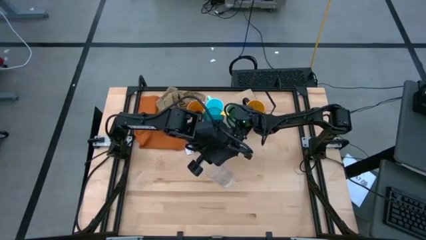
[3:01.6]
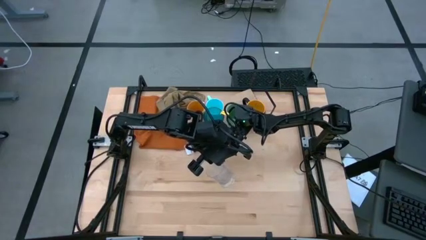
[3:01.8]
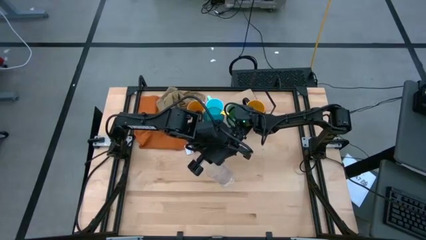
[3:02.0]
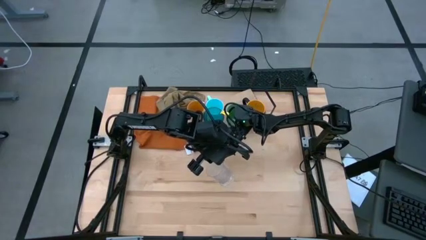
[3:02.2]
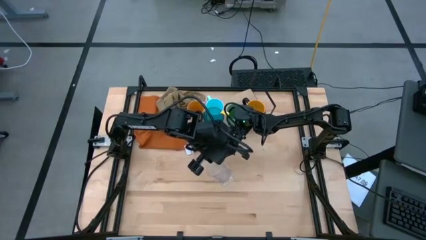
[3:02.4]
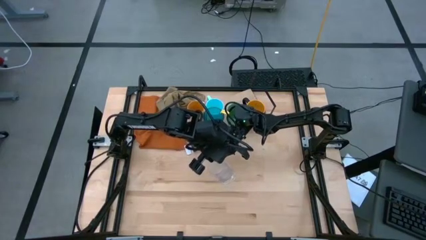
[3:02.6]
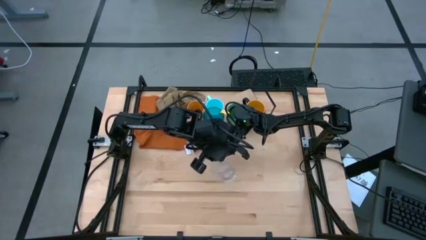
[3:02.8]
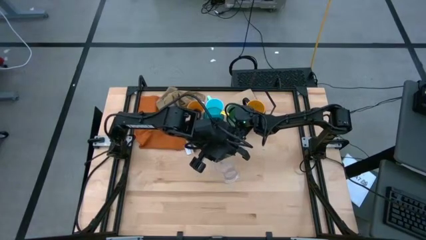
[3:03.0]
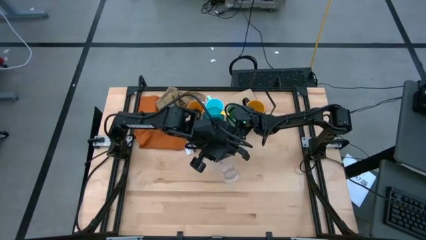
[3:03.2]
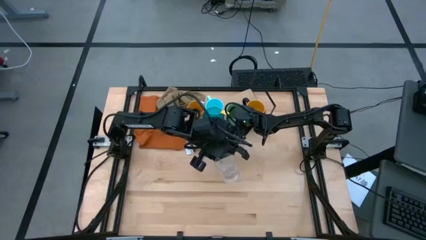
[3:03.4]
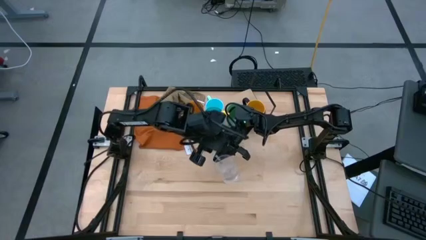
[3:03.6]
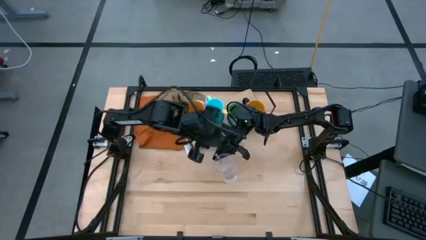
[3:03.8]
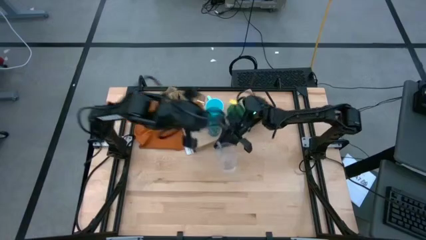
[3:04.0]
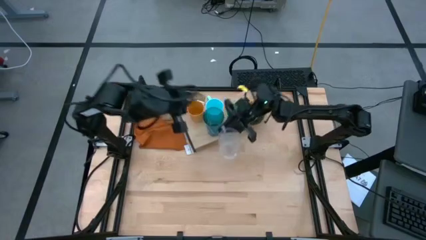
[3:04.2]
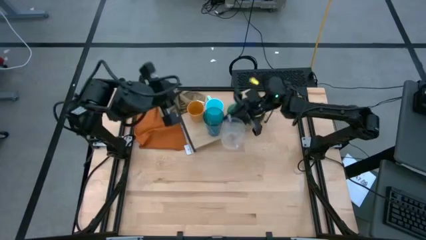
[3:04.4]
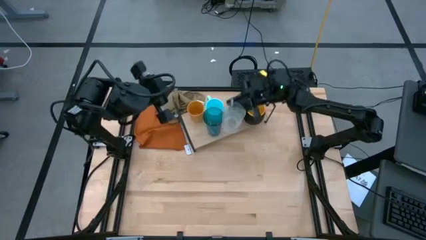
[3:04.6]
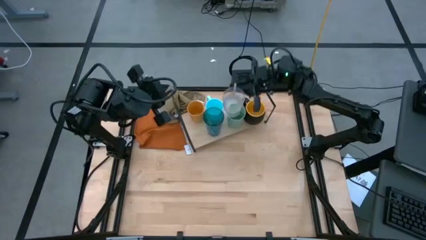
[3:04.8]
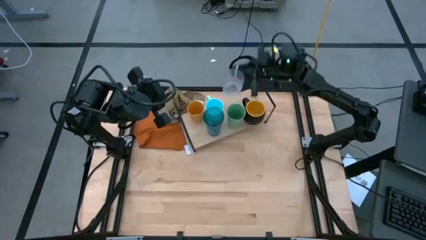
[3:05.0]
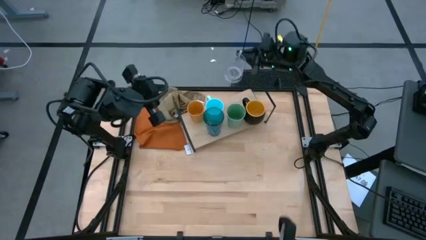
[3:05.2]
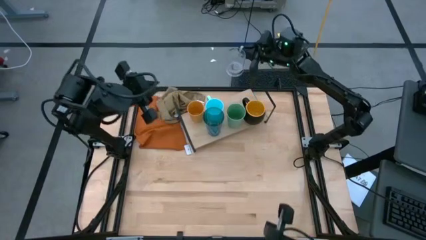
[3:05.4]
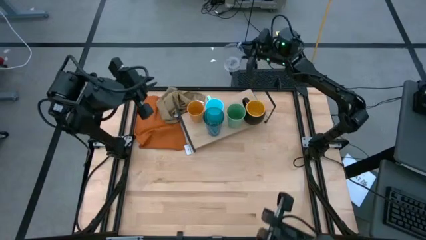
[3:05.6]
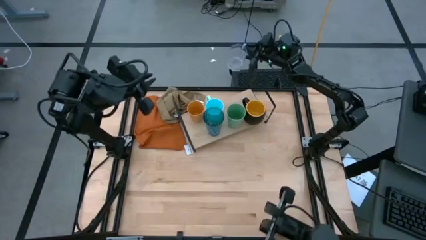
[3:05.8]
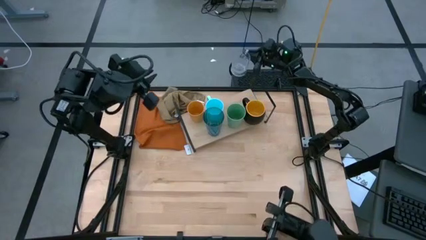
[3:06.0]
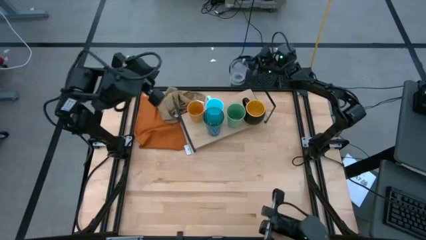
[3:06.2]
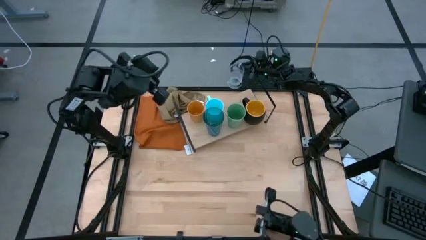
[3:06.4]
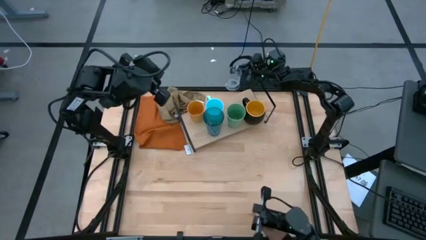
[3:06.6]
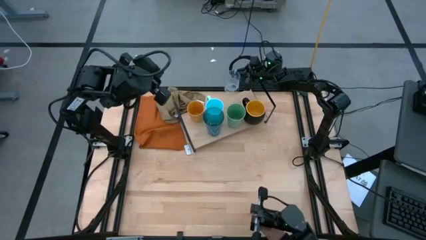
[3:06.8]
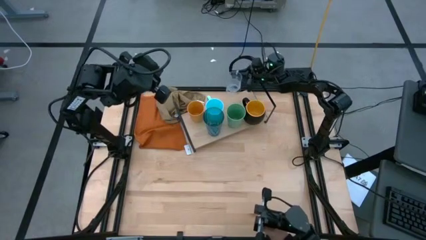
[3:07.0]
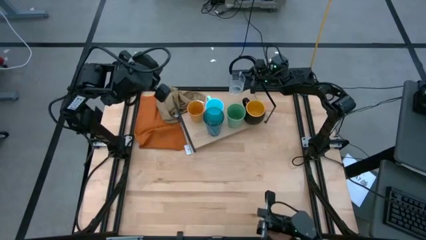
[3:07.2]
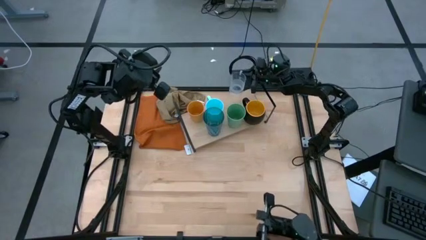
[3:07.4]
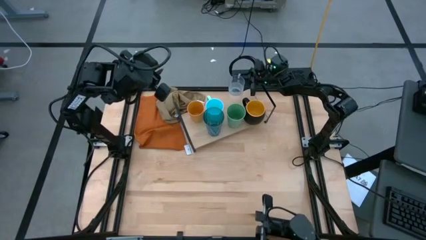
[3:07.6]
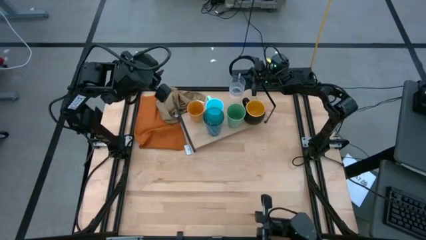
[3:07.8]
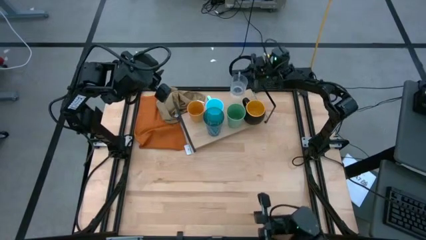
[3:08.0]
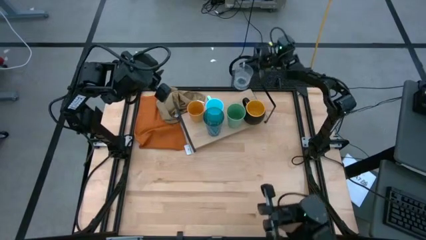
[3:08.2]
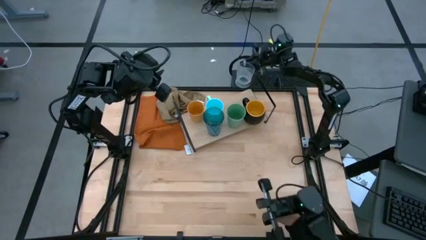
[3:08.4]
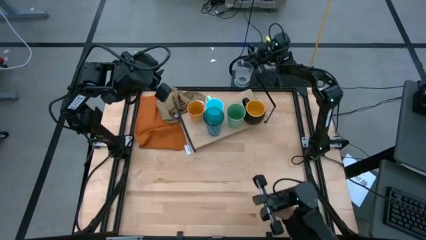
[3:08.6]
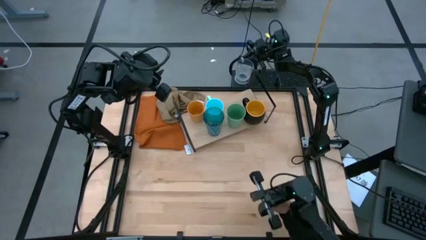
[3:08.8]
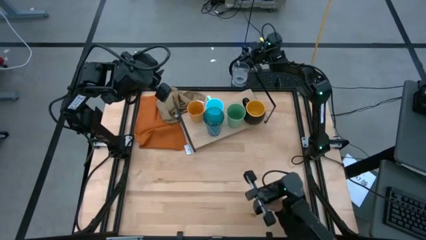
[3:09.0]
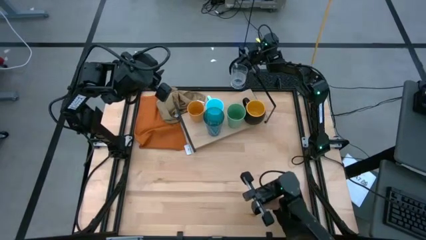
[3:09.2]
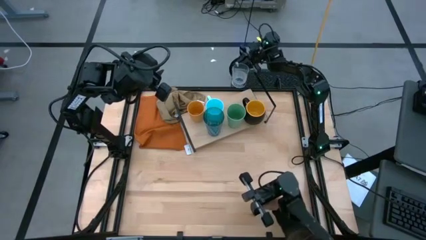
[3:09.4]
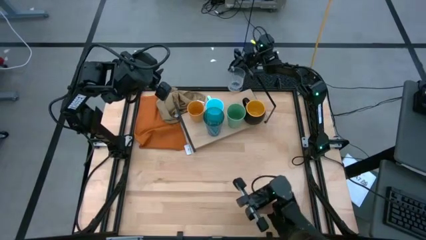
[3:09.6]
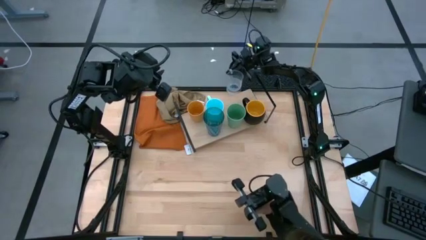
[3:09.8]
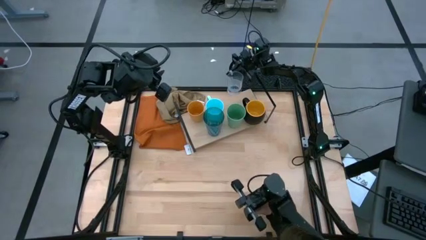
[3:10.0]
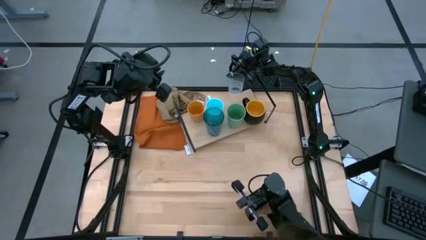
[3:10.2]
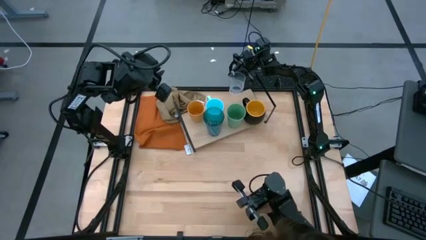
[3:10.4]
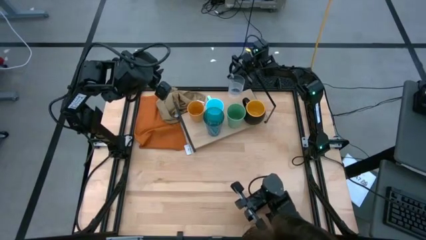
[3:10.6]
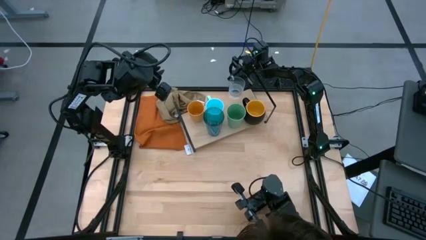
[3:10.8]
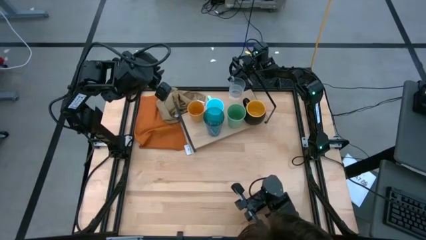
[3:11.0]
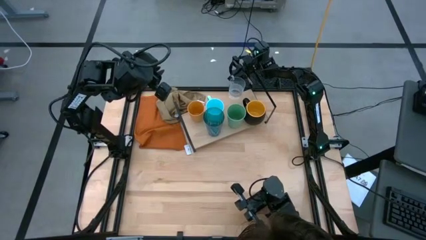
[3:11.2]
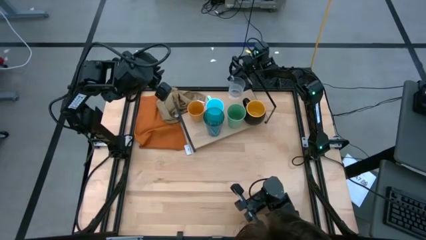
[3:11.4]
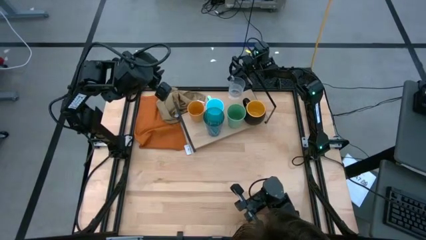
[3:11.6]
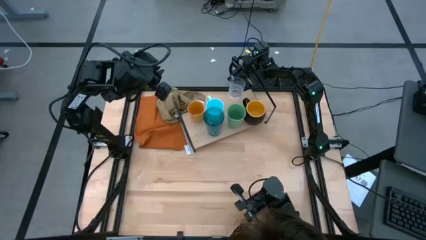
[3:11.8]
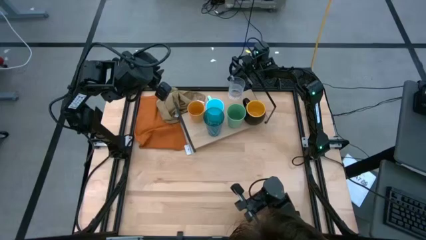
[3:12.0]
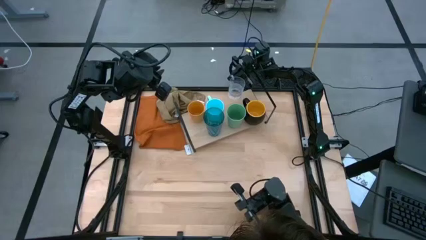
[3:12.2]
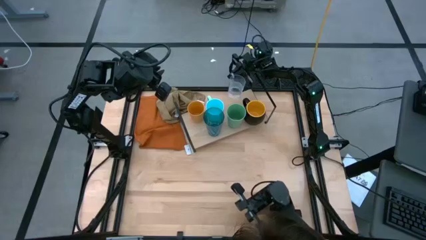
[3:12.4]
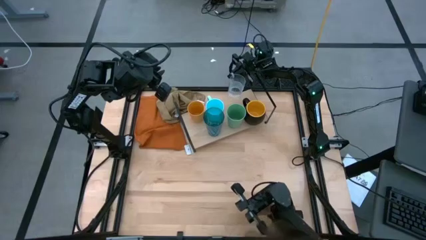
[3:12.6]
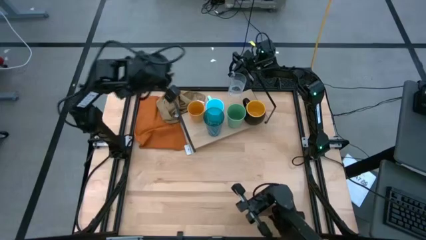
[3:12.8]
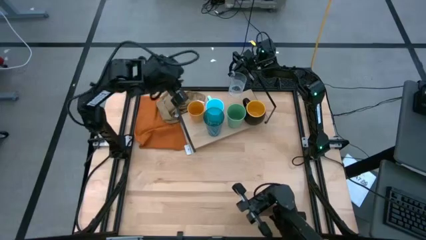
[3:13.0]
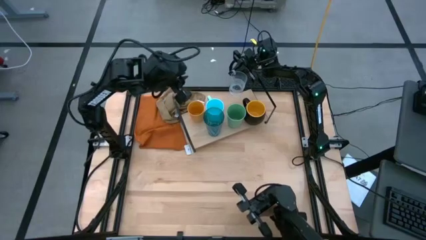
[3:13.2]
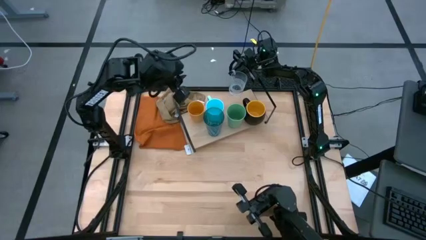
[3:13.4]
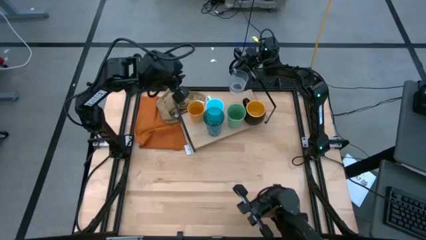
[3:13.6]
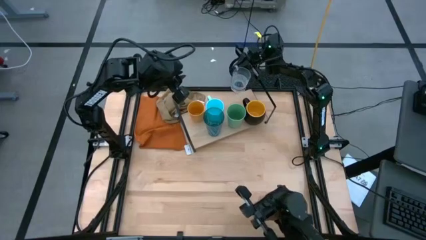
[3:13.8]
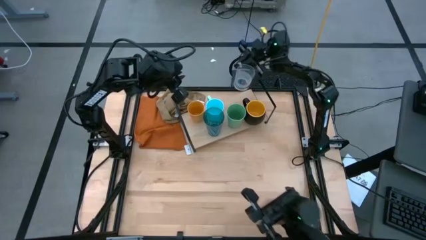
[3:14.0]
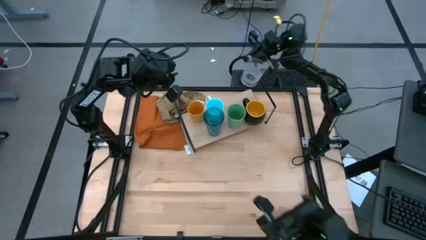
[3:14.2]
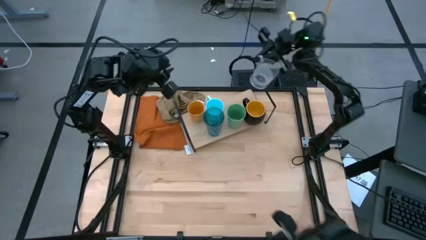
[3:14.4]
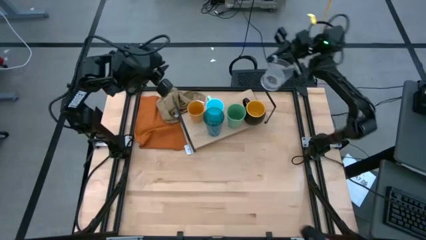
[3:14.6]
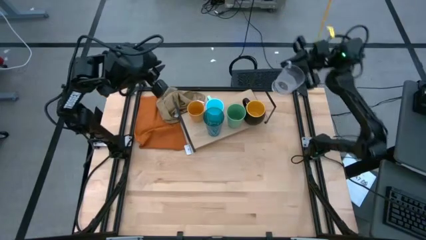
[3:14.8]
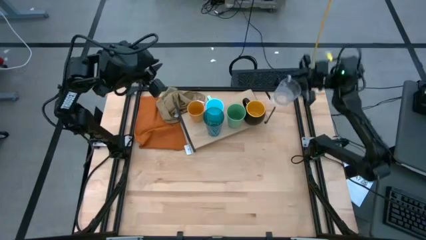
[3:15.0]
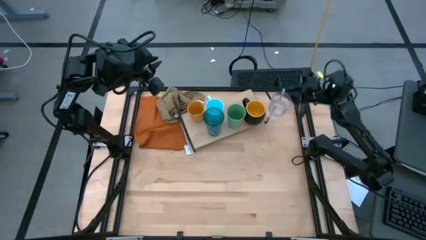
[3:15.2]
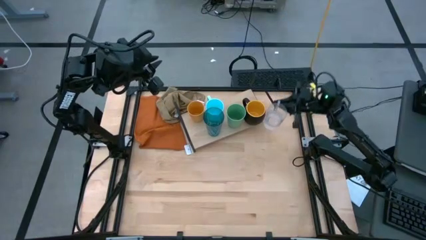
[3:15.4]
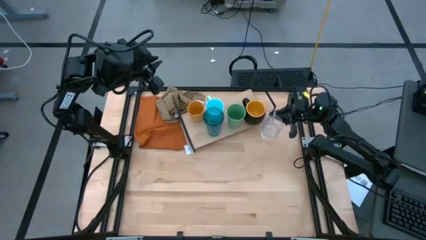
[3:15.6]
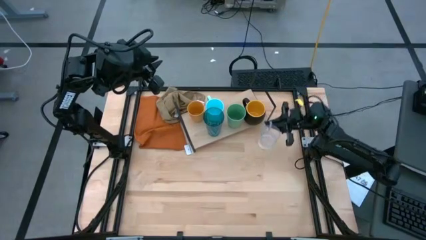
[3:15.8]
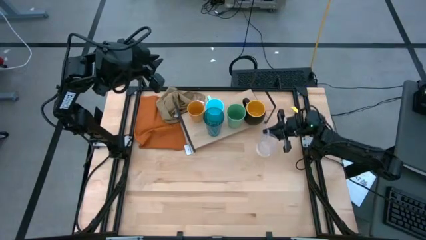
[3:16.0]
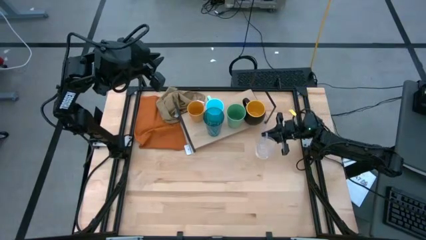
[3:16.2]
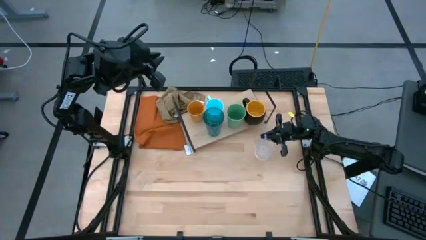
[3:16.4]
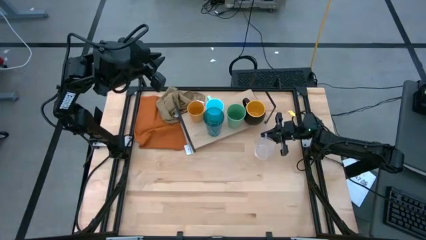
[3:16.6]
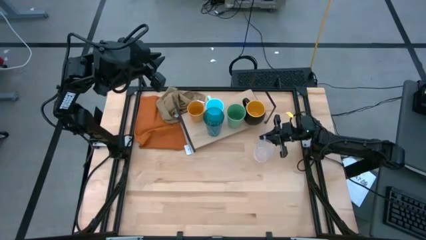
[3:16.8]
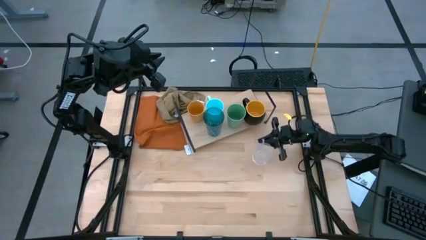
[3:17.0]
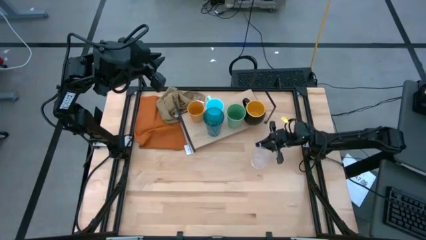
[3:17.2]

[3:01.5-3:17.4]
Task: Stack small to large cups/mugs on shelf
Put the transparent mug on the shelf
